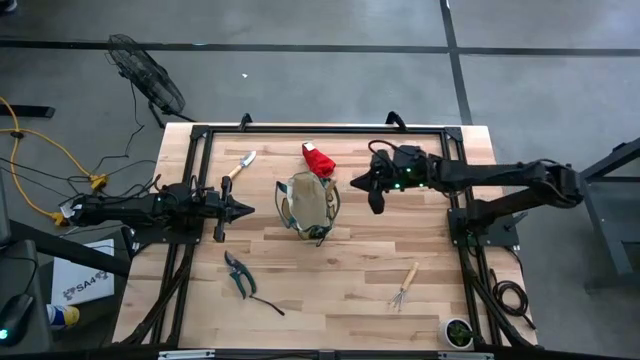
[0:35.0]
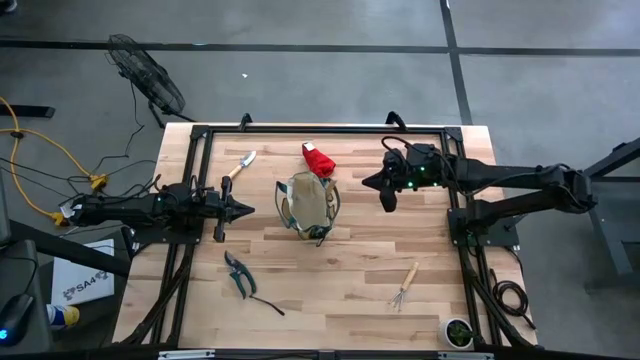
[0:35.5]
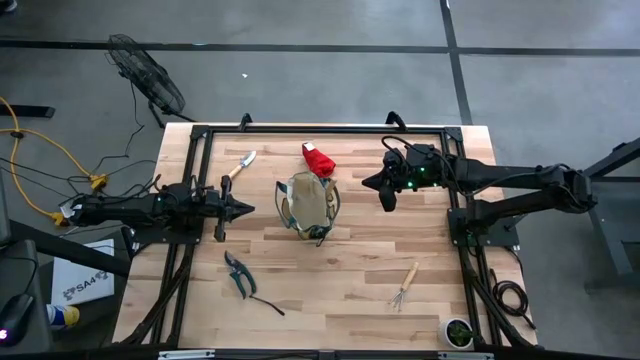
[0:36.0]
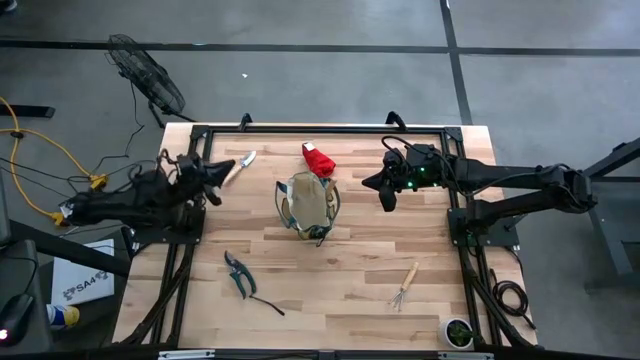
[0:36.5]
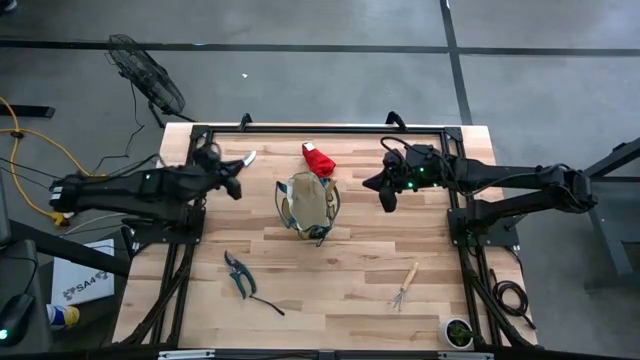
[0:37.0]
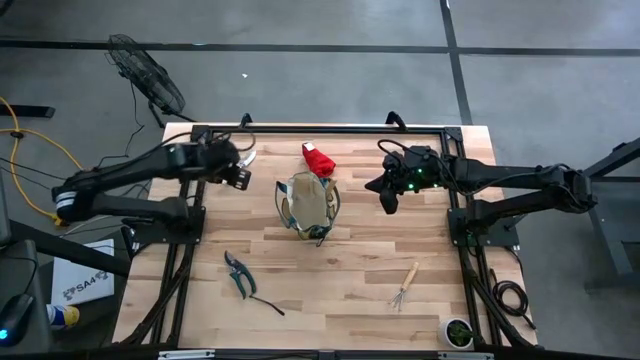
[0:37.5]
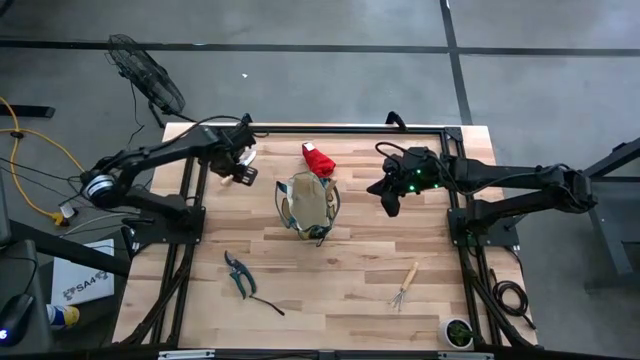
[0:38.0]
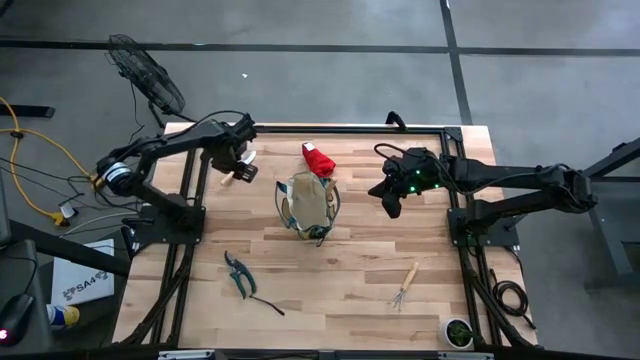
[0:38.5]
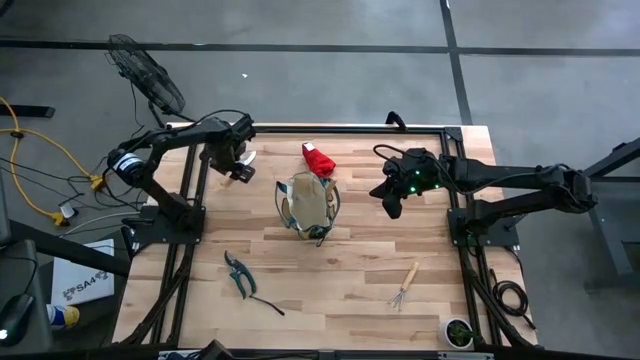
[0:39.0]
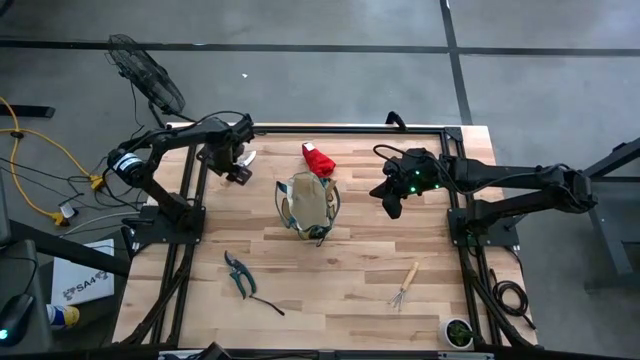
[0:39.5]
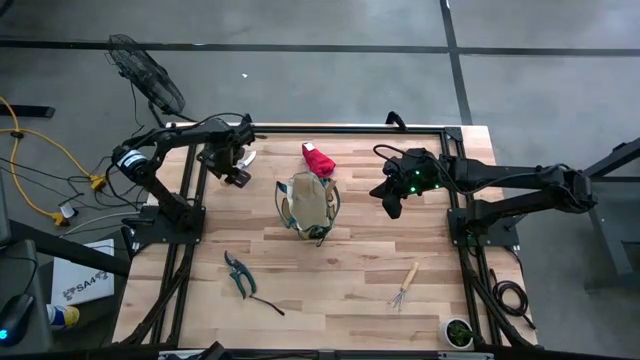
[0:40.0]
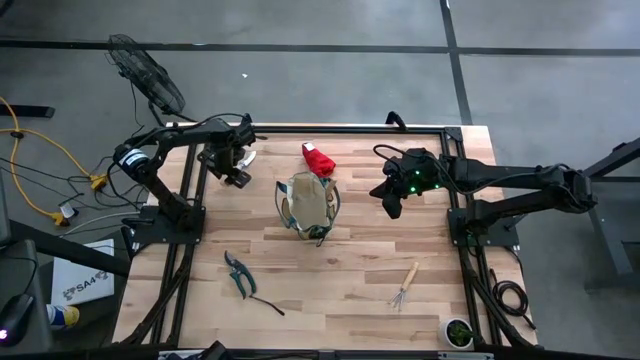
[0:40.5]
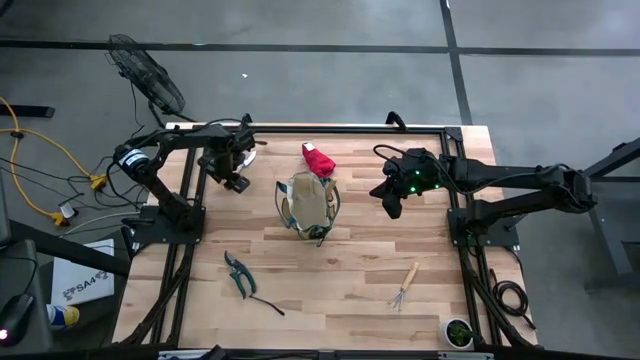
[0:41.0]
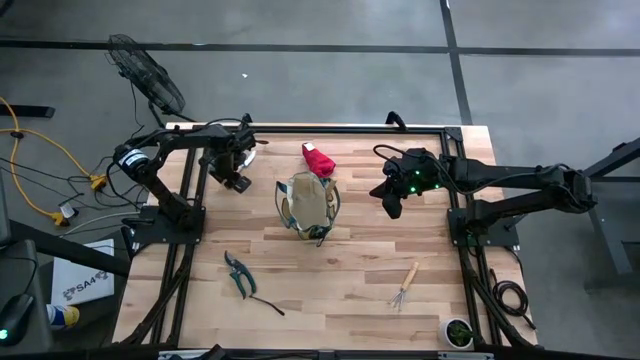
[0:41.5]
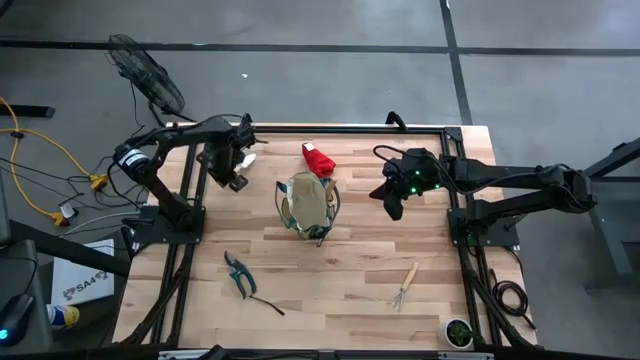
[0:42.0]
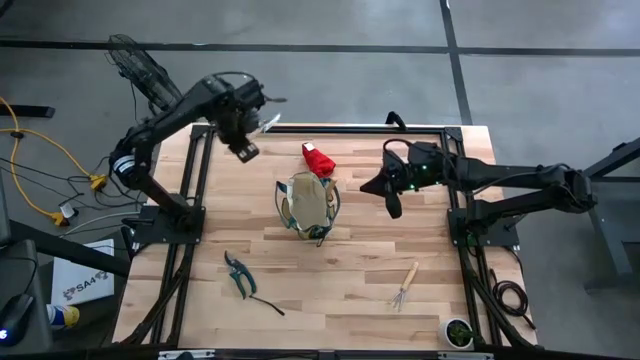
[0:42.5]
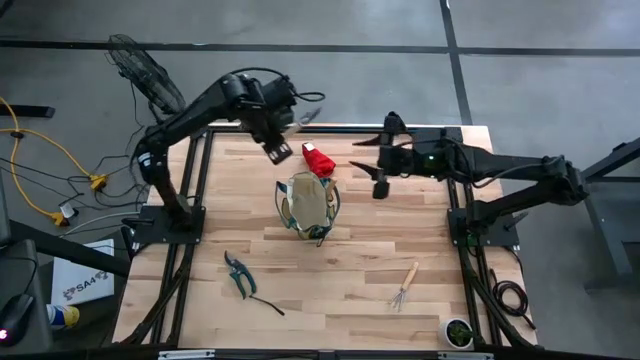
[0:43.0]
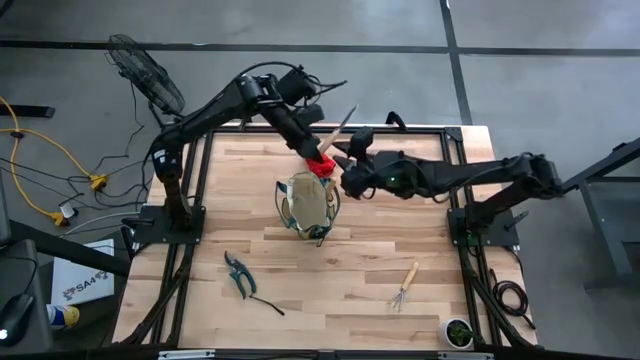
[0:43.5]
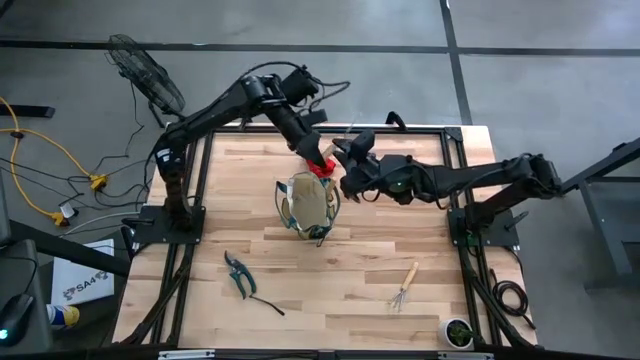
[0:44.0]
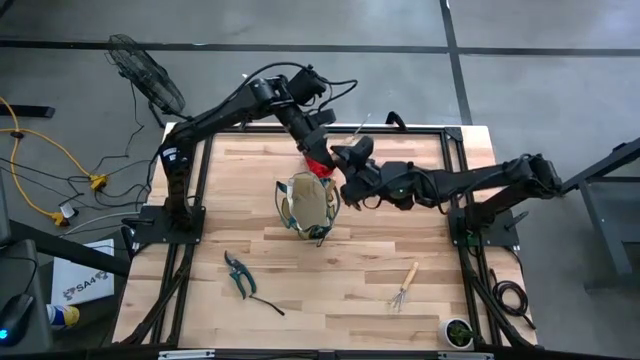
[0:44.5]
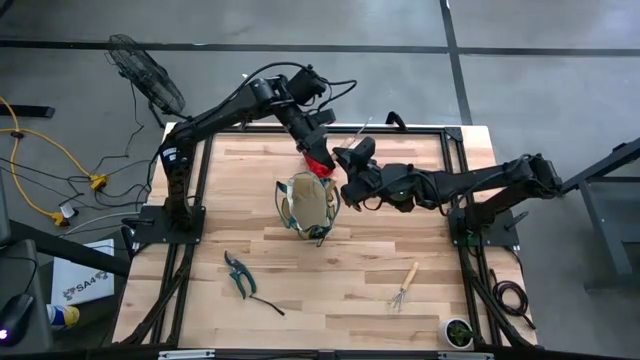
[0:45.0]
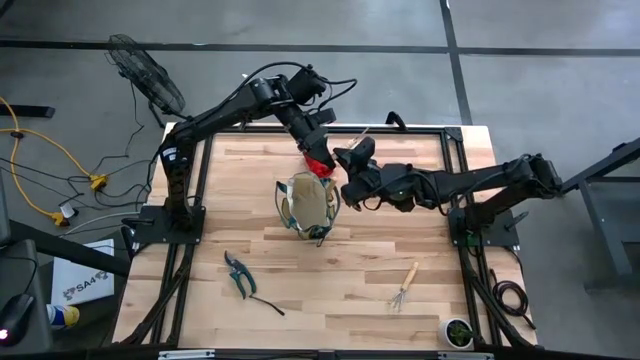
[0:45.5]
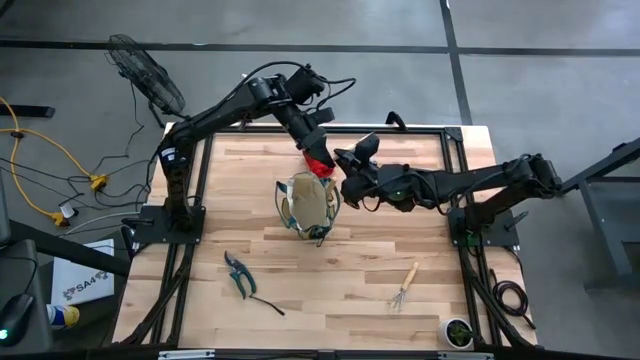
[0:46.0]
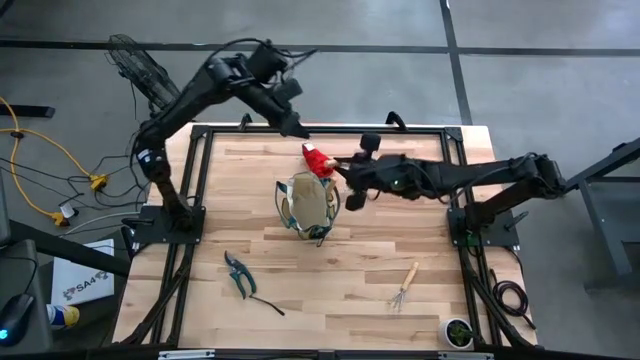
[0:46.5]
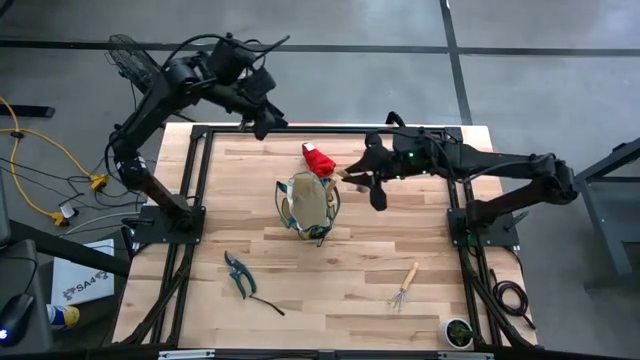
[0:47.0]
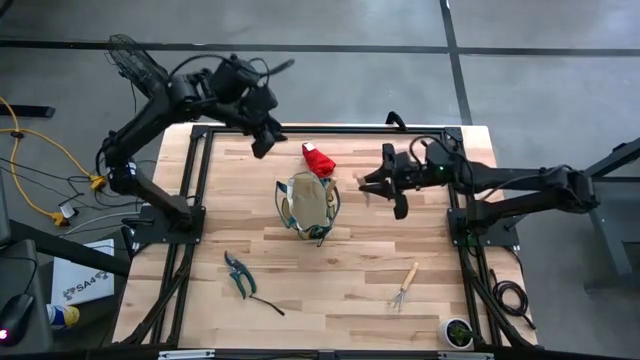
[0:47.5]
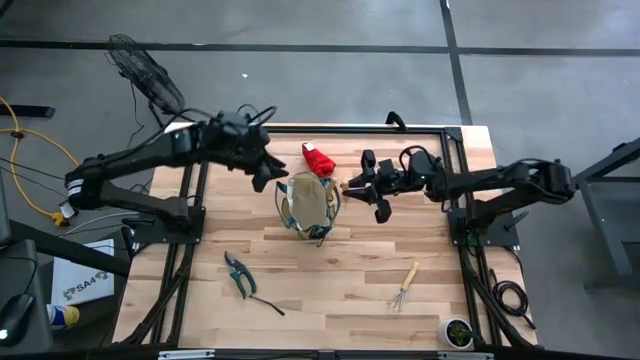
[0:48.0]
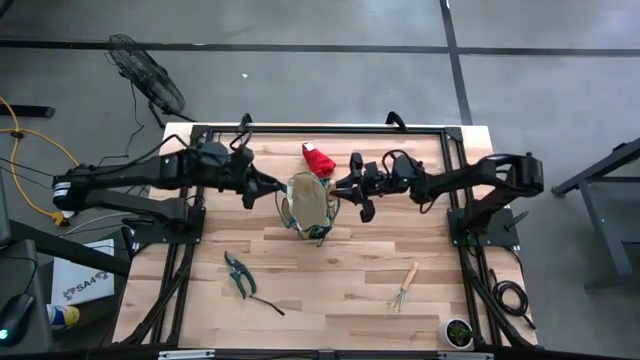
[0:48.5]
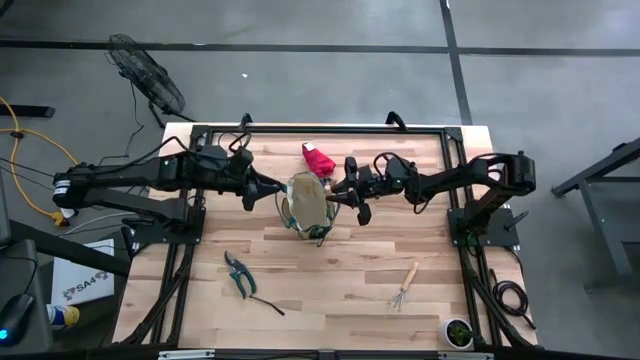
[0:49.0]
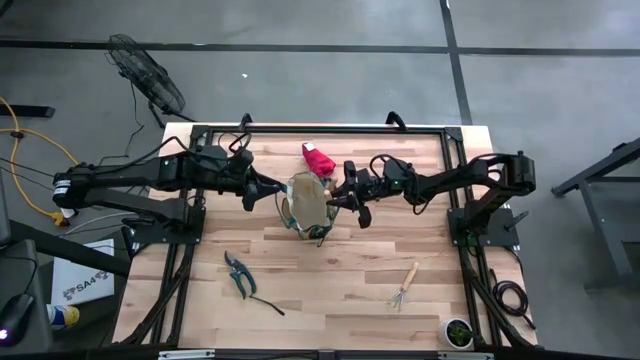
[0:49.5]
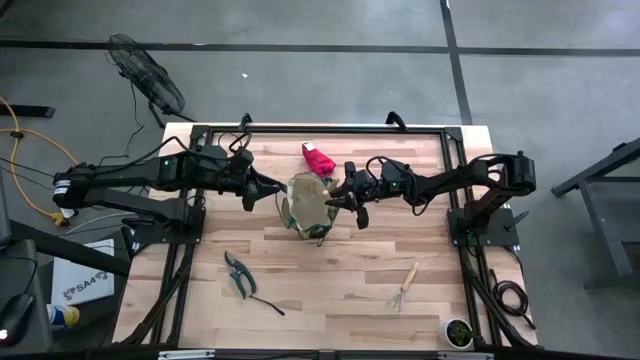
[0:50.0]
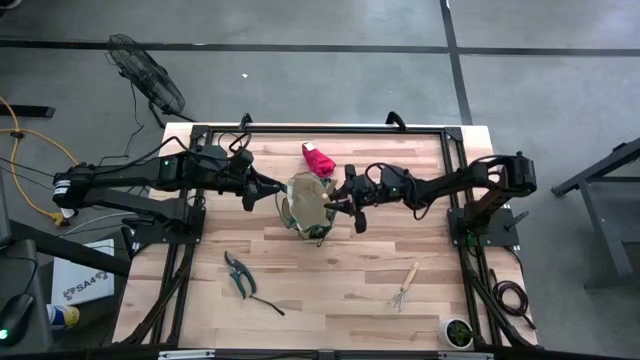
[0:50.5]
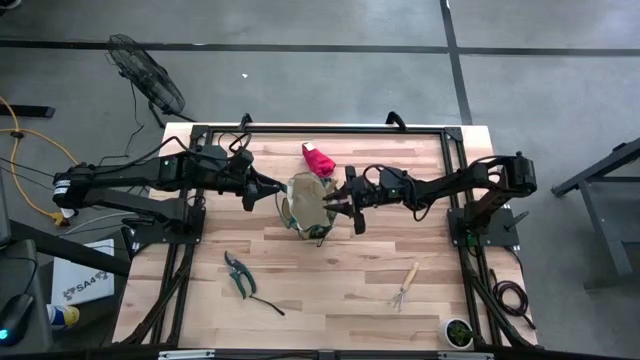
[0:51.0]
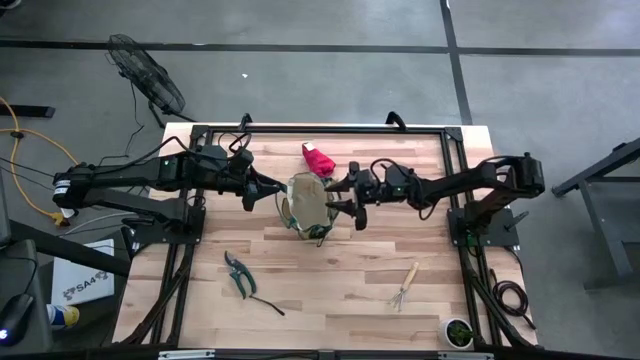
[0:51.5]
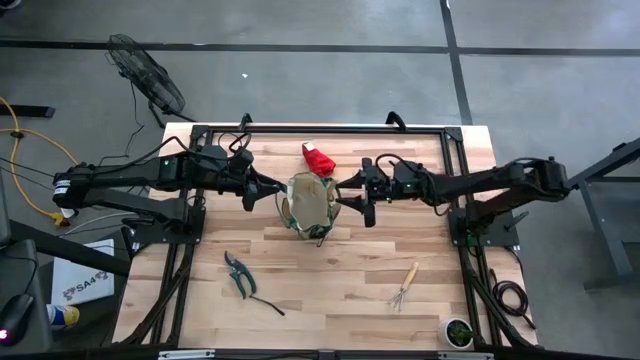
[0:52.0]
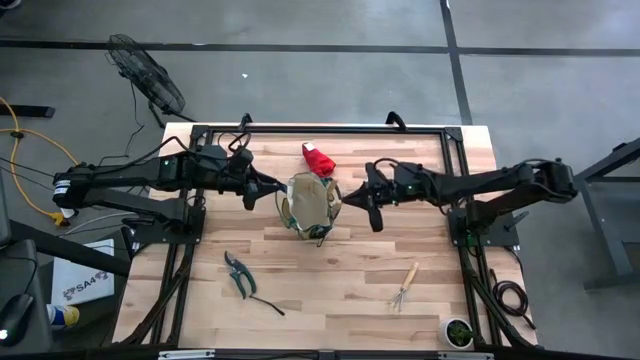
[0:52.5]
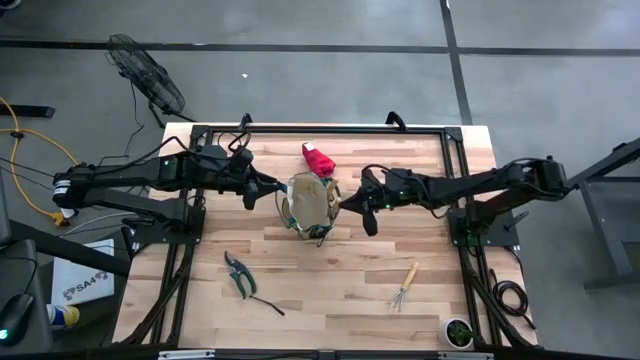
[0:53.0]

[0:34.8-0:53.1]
Task: Pick & Place Garden tools in Gardening bag
Put the brown trowel into the brown gardening bag

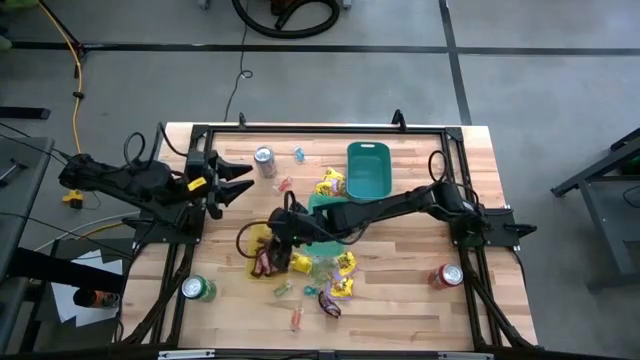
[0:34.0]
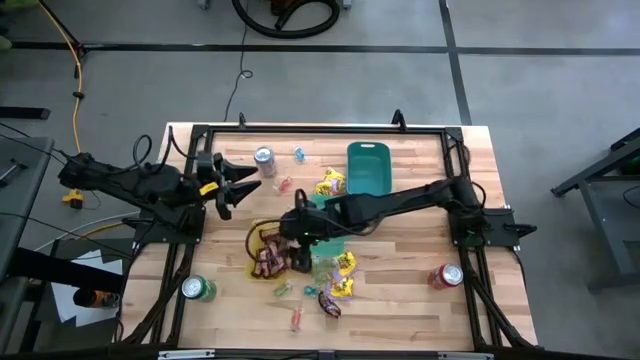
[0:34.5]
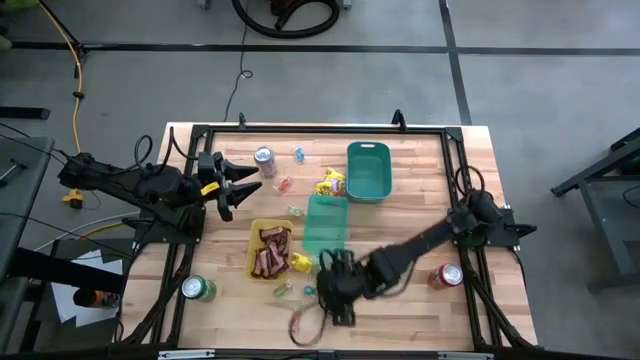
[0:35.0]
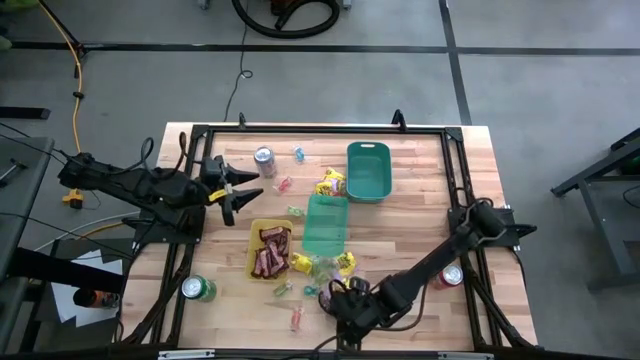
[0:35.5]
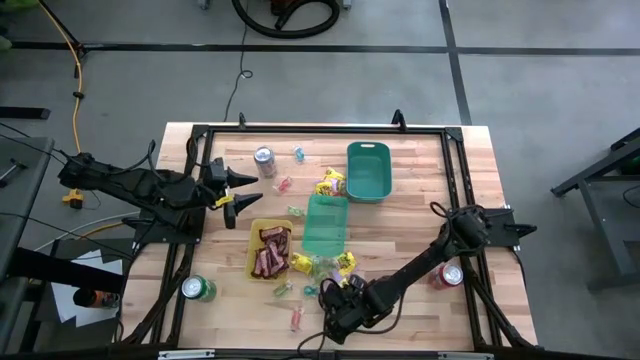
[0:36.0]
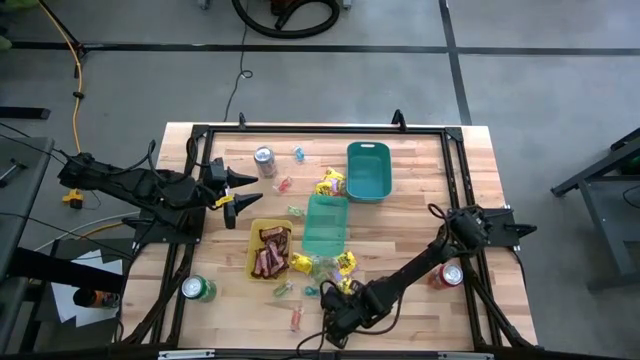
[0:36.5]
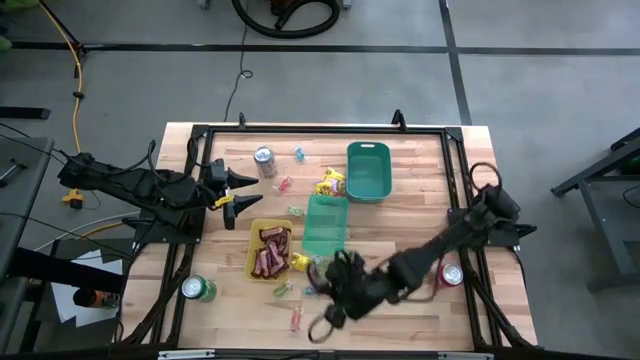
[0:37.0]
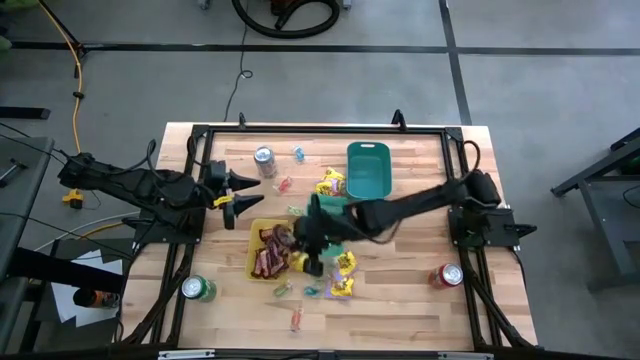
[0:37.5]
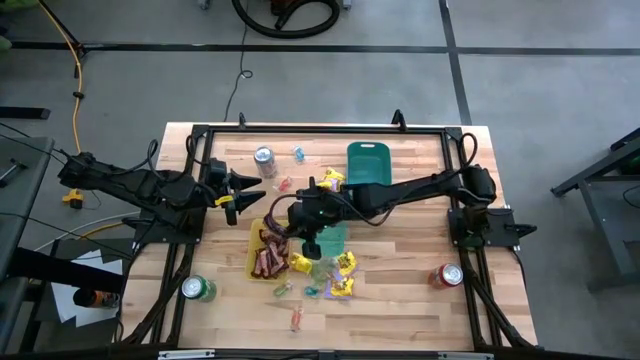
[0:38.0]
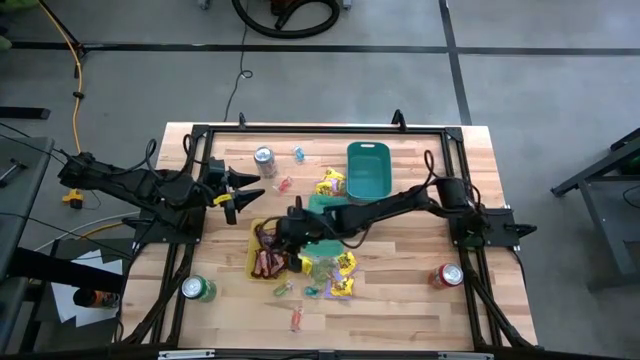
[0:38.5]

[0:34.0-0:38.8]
Task: Sort candy
Put the brown chocolate bar into the yellow bin
